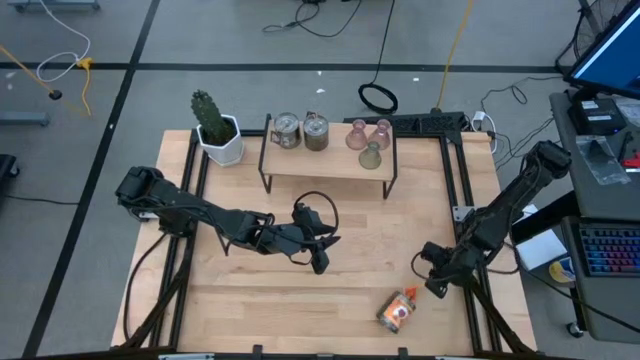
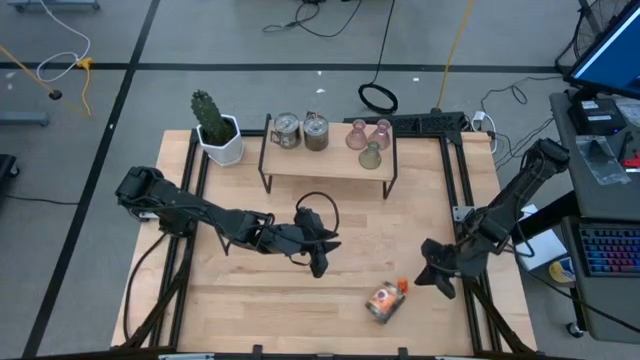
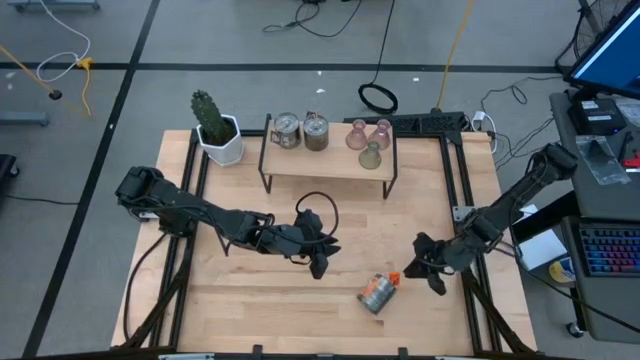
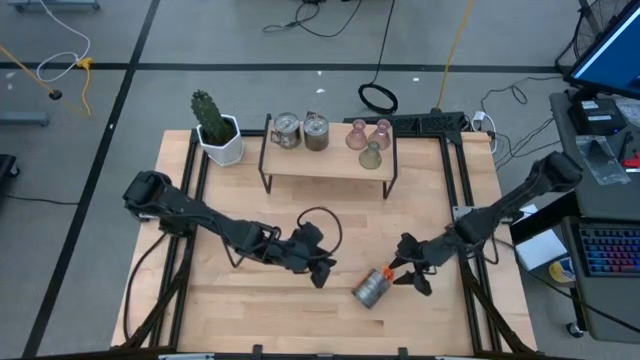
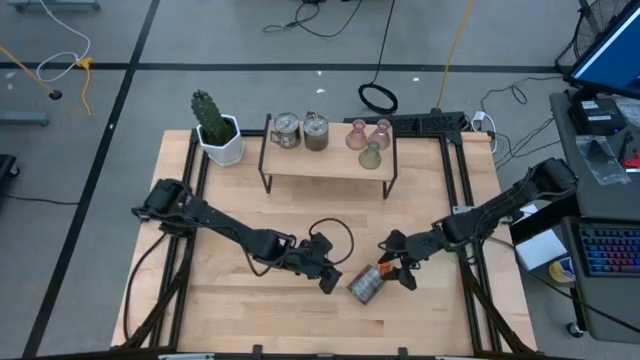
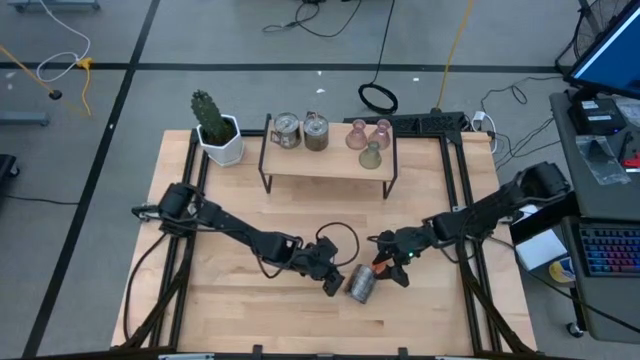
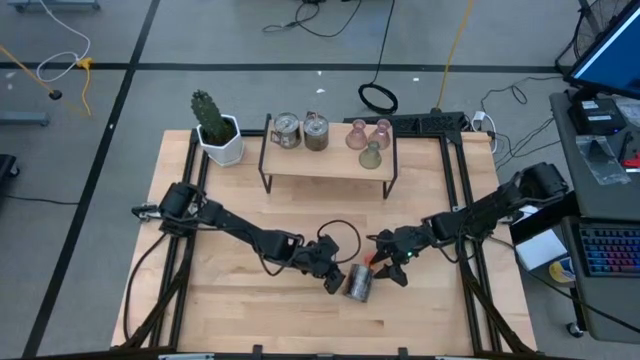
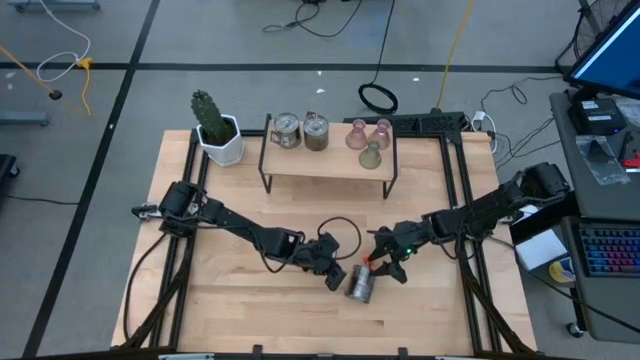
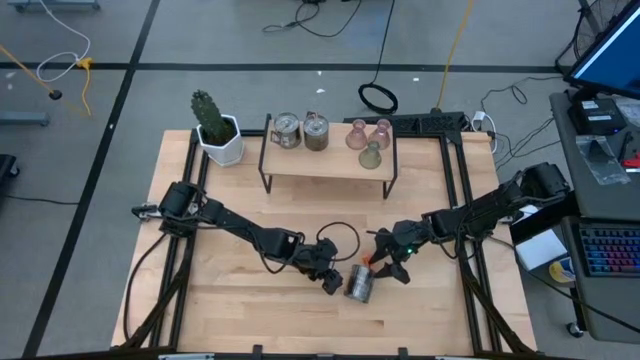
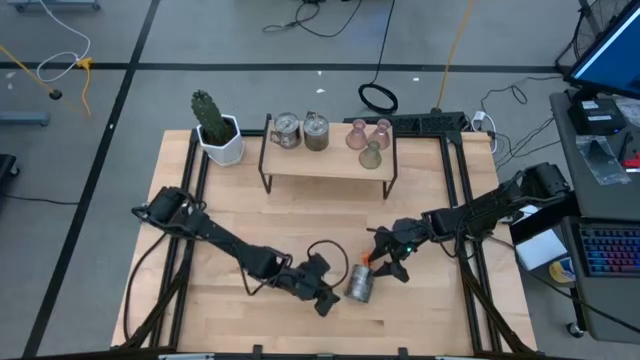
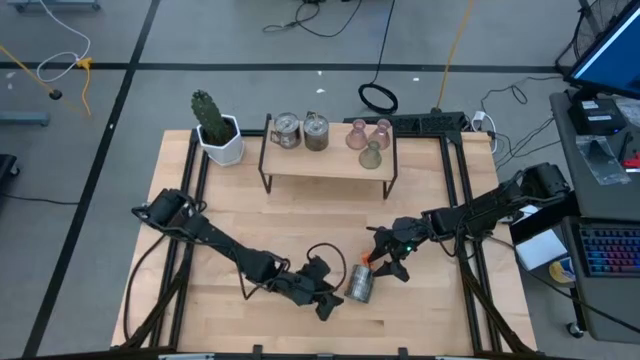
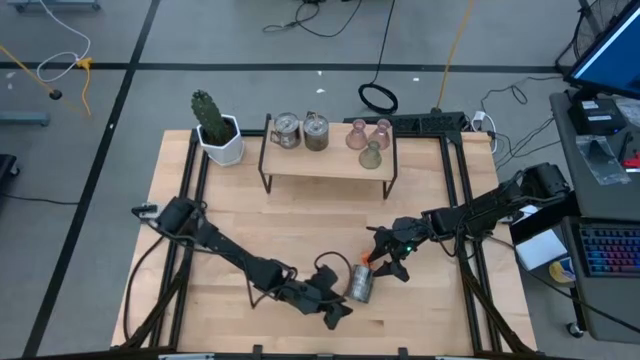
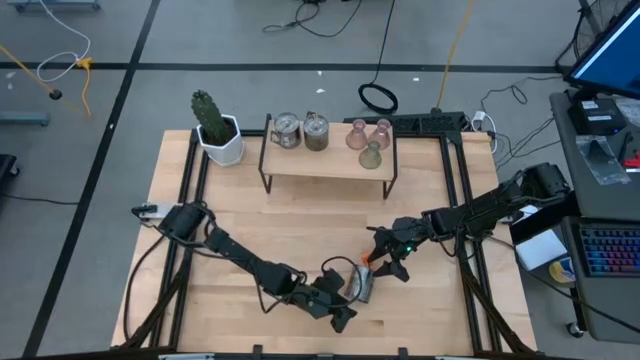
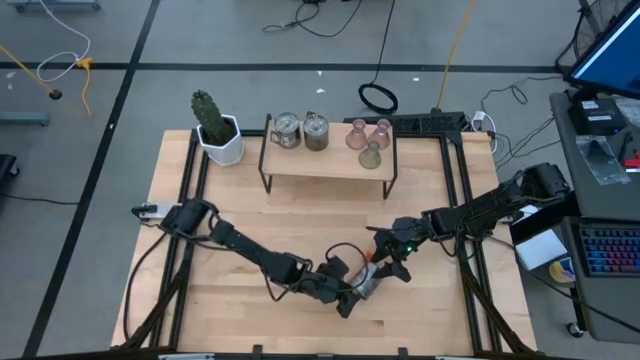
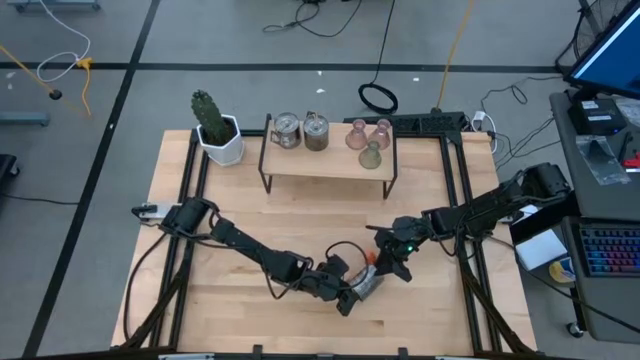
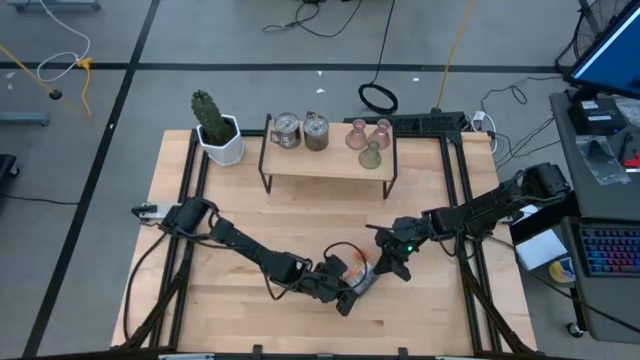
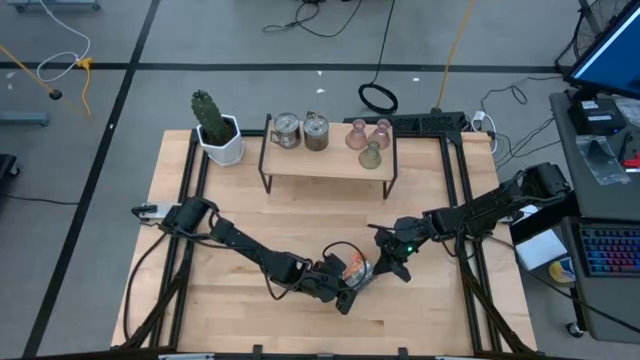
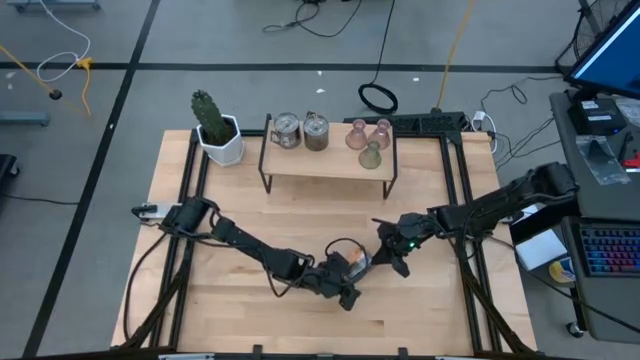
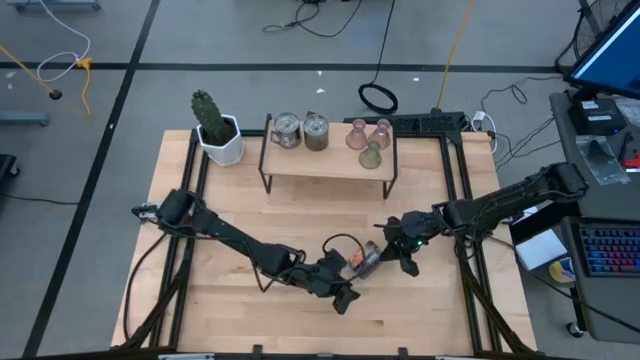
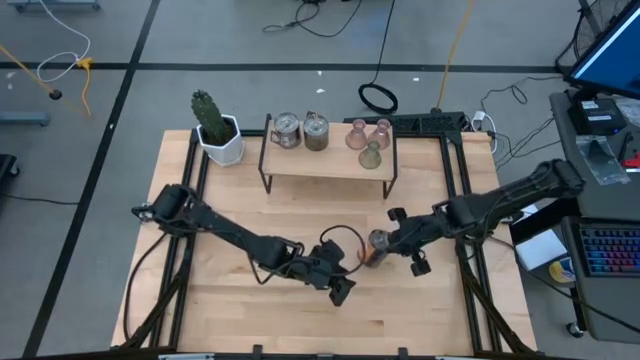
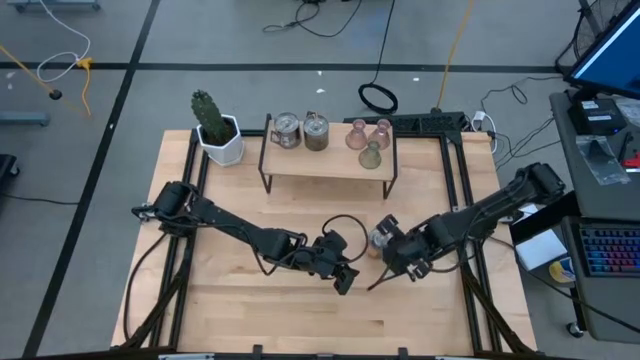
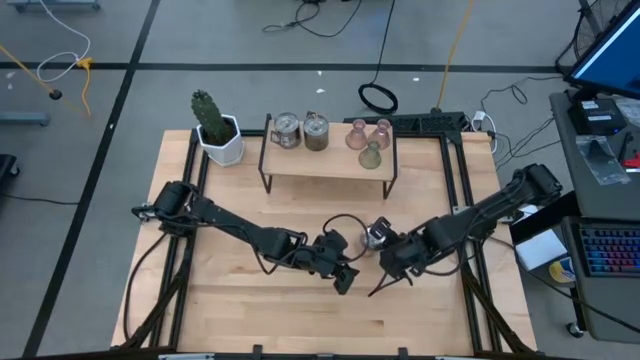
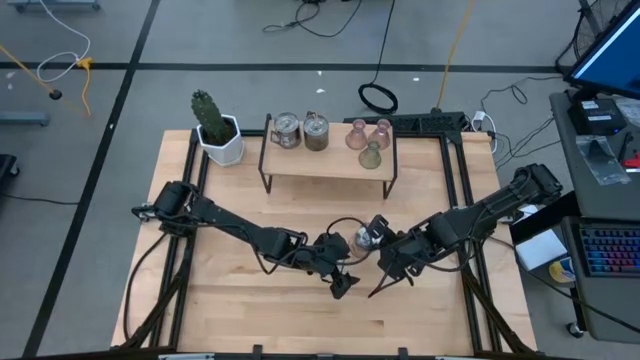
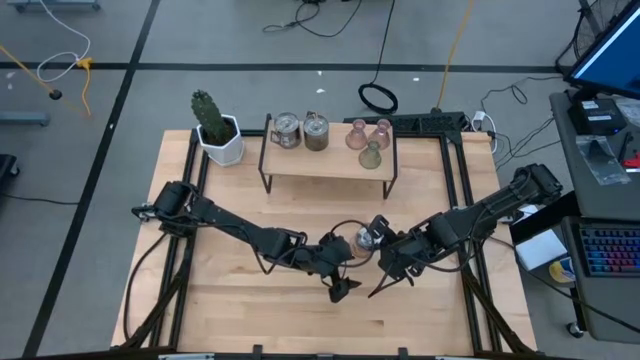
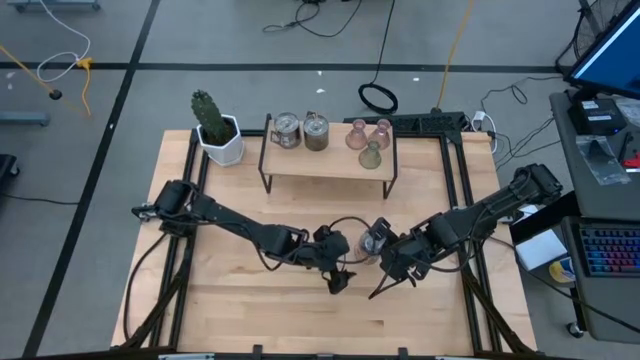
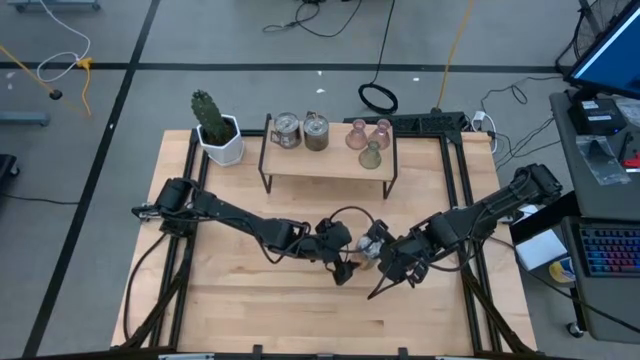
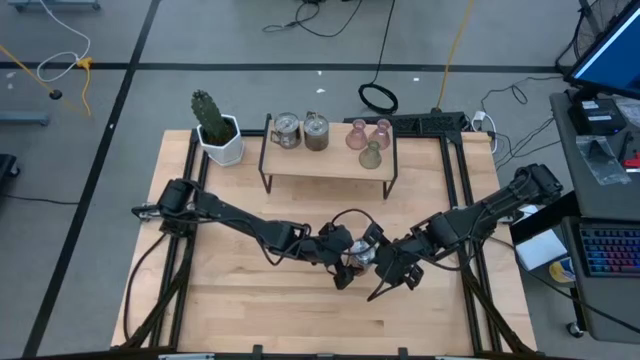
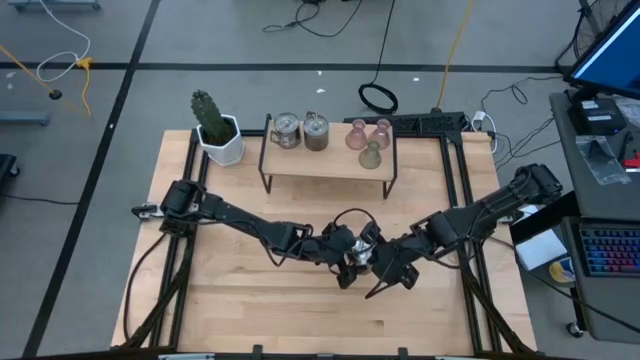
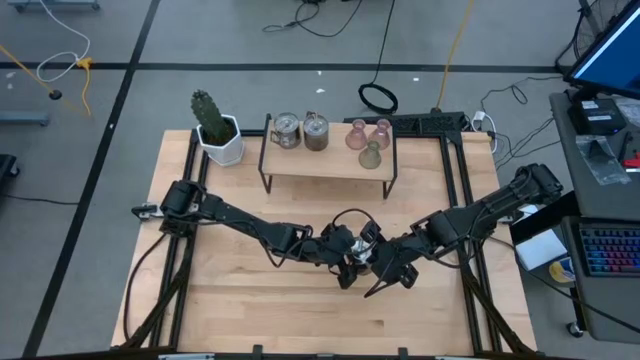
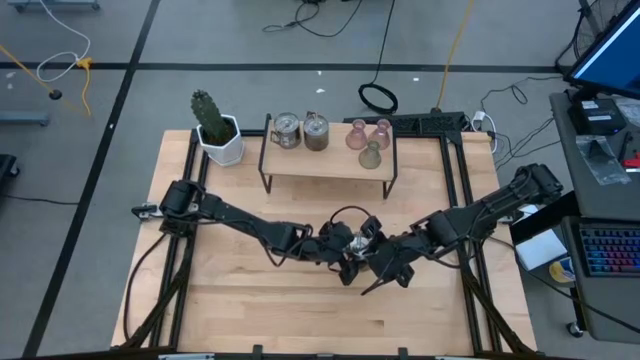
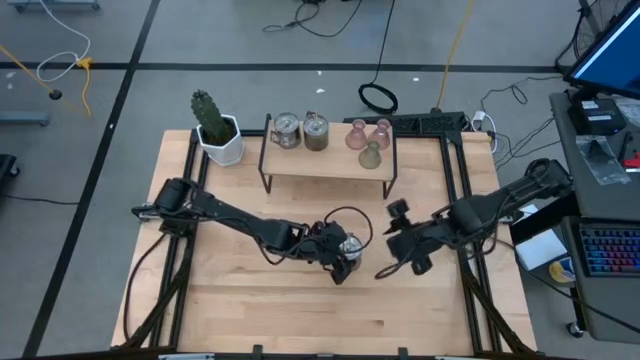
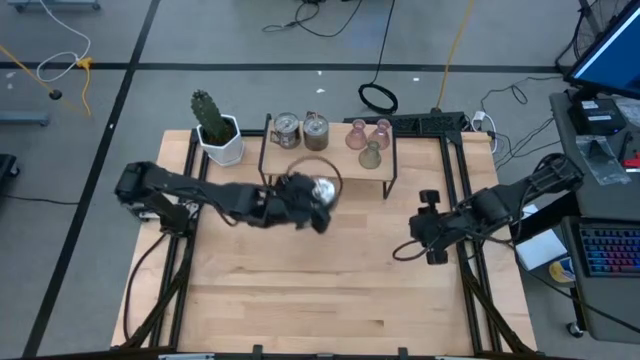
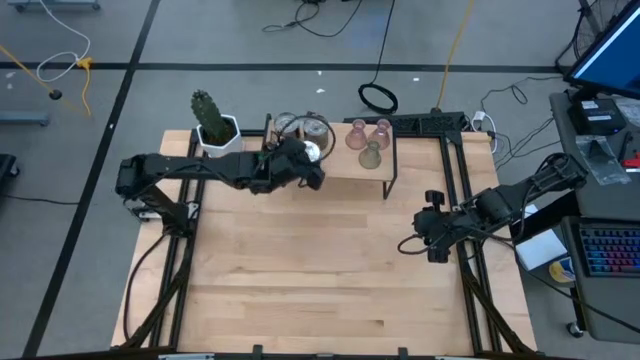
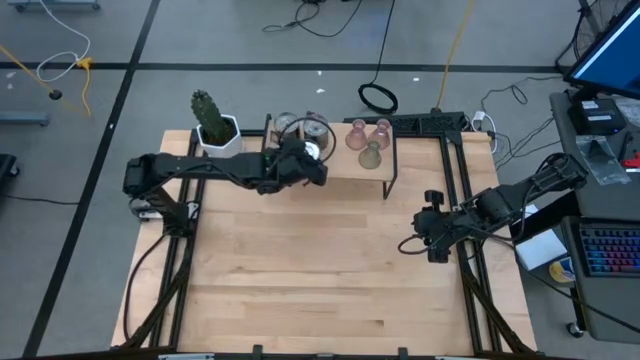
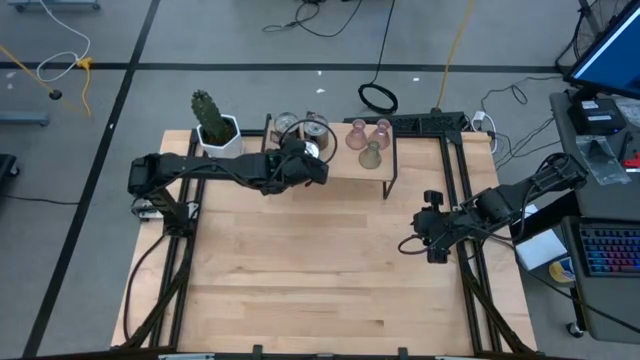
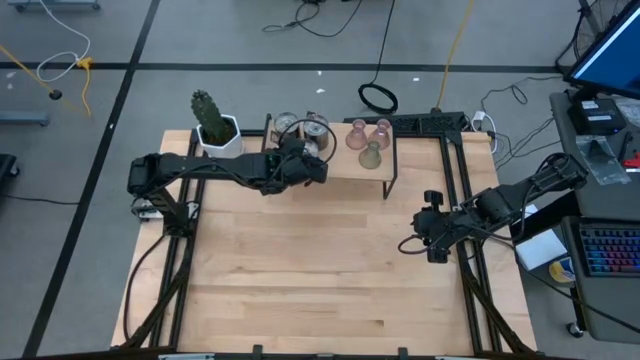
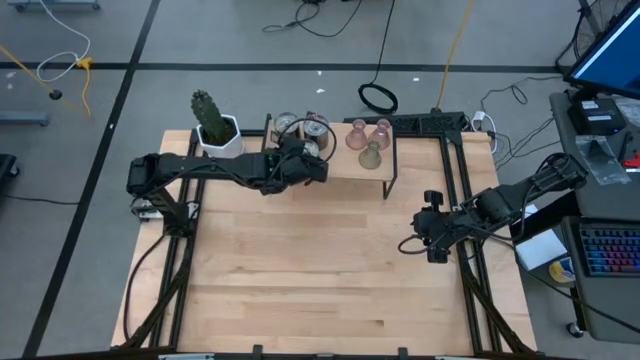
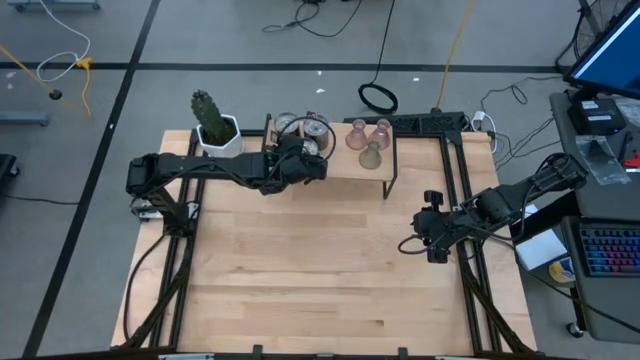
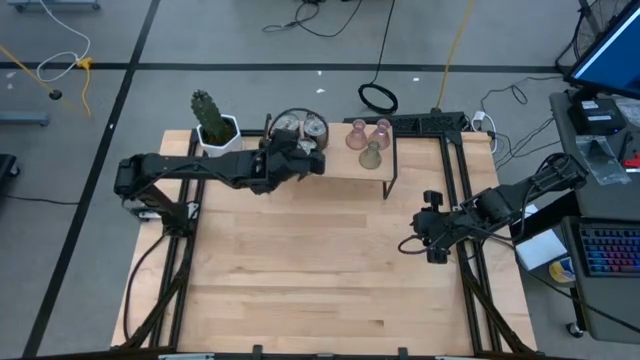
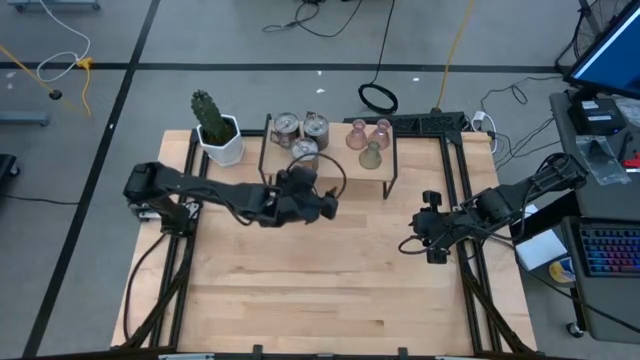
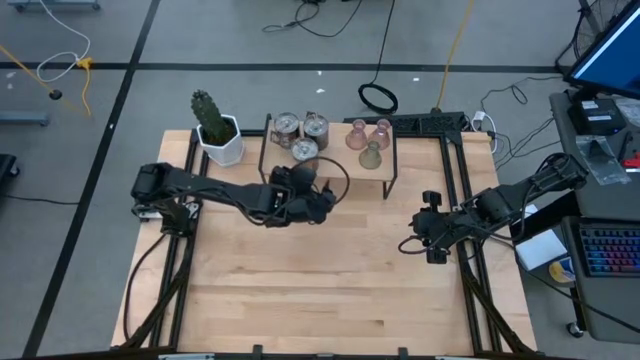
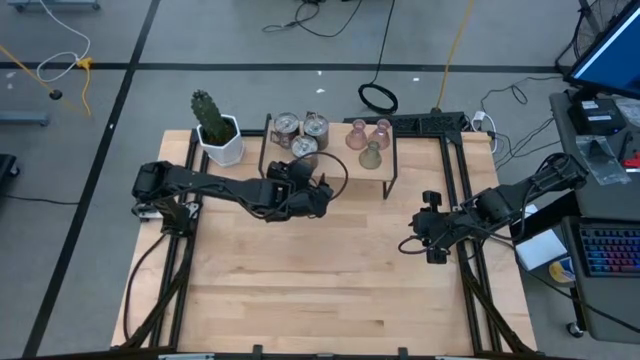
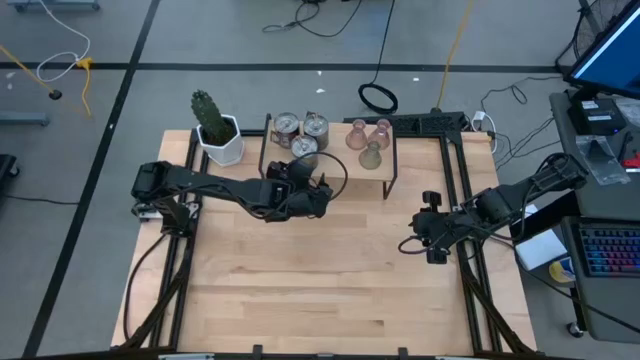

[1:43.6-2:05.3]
Task: Pick & Place candle stick holders
Put the silver scented candle on the shelf

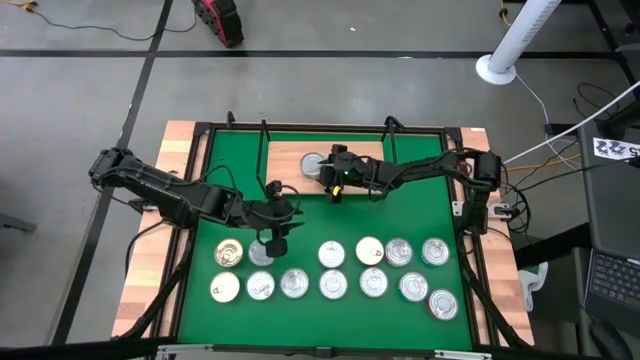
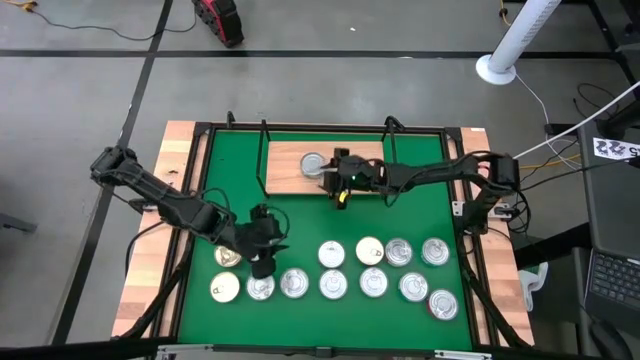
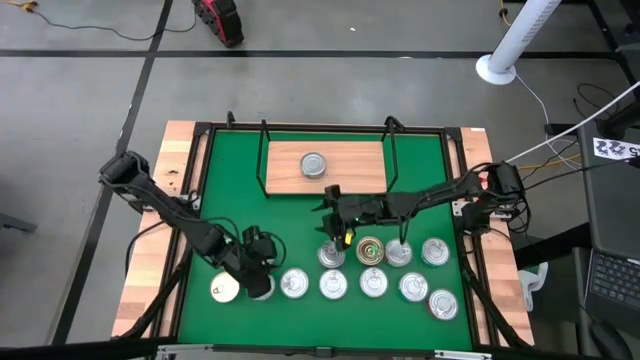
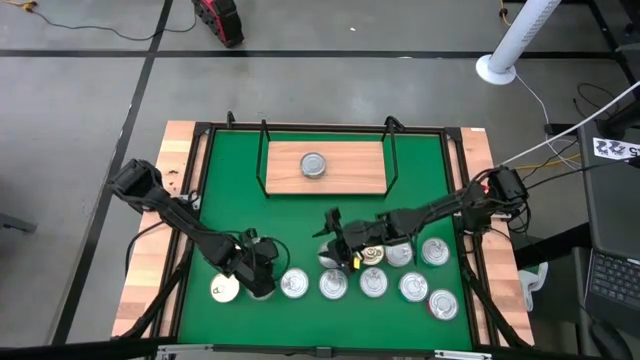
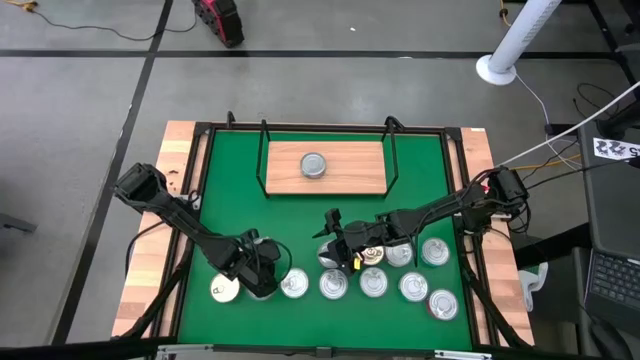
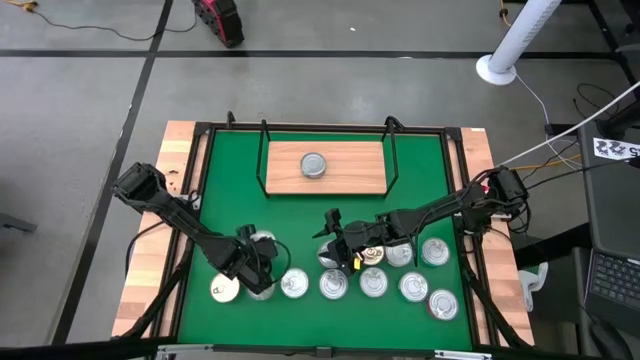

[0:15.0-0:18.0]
Task: Stack canned seafood by type on shelf
Stack the green white tuna can on top of the other green white tuna can on the shelf
